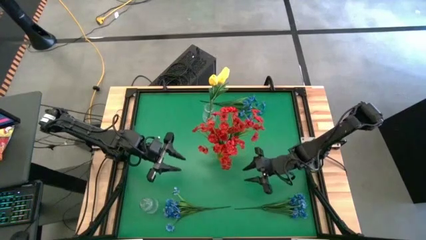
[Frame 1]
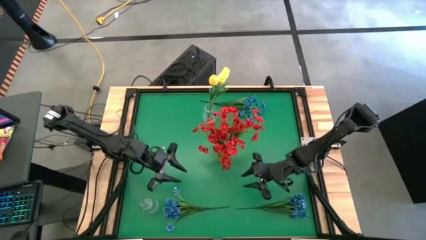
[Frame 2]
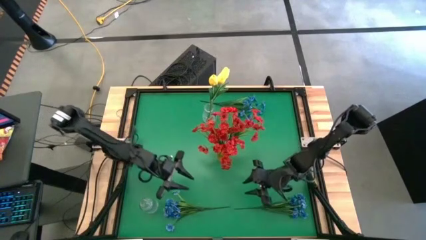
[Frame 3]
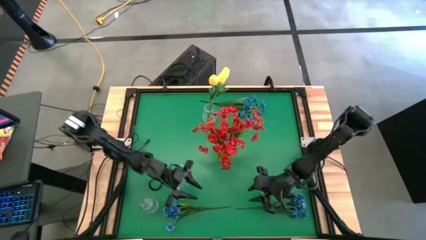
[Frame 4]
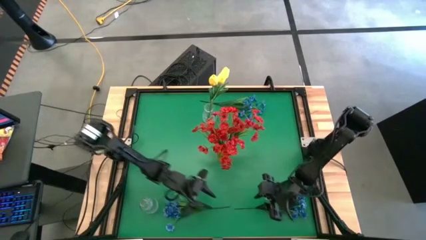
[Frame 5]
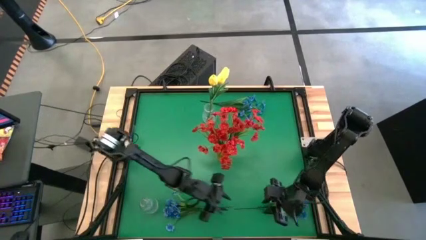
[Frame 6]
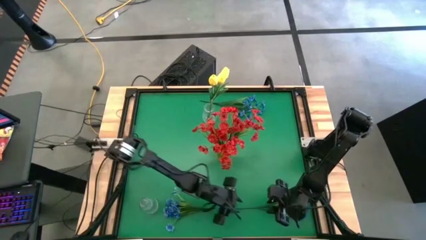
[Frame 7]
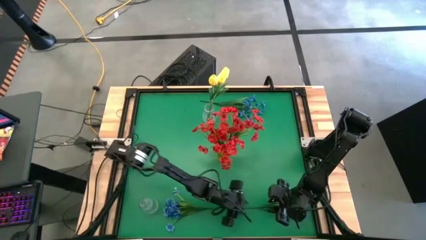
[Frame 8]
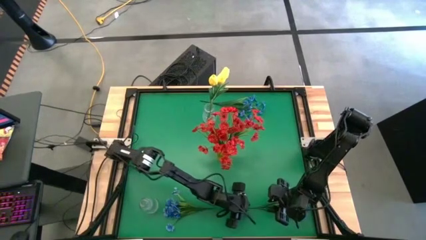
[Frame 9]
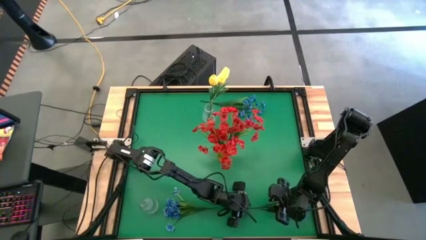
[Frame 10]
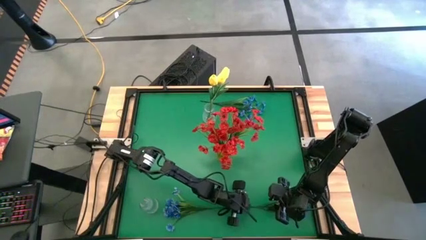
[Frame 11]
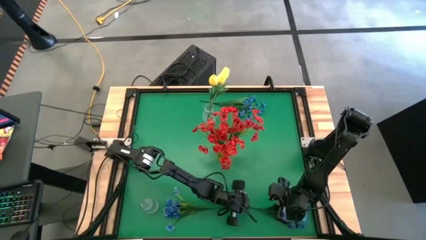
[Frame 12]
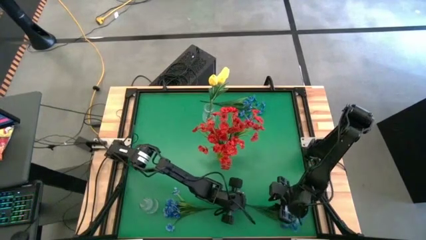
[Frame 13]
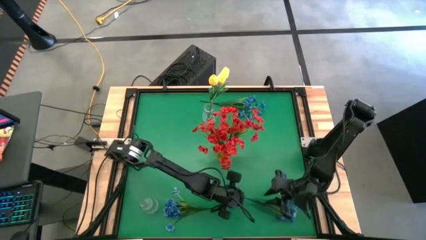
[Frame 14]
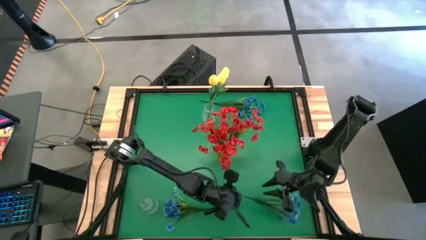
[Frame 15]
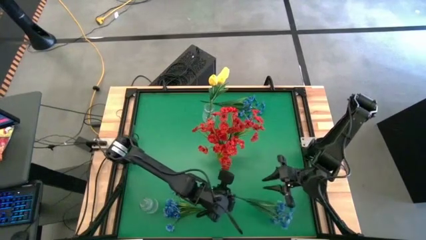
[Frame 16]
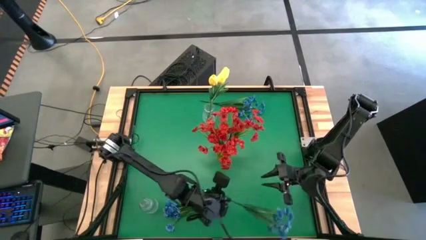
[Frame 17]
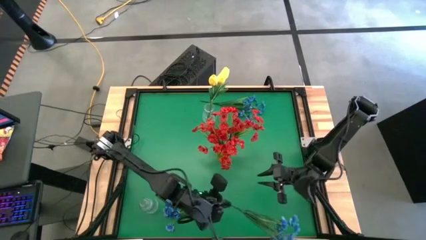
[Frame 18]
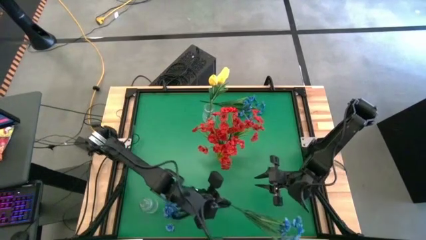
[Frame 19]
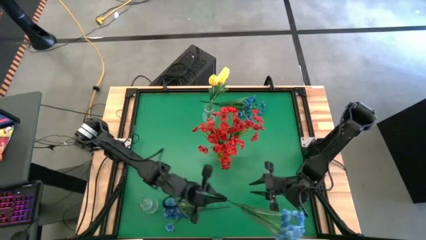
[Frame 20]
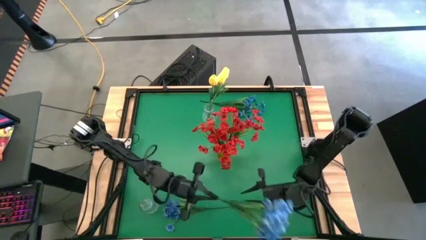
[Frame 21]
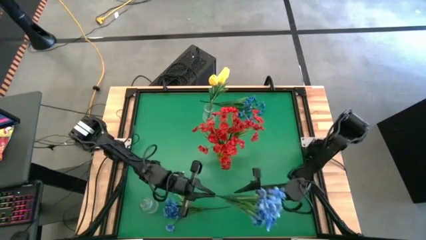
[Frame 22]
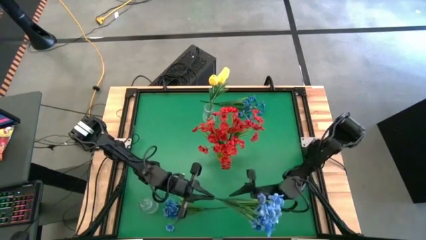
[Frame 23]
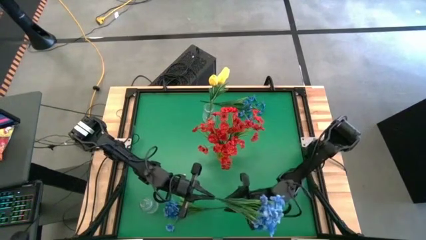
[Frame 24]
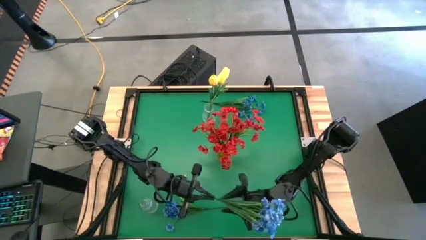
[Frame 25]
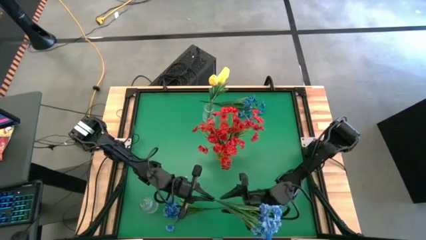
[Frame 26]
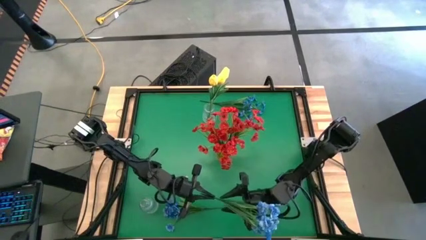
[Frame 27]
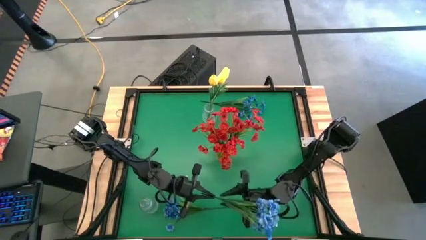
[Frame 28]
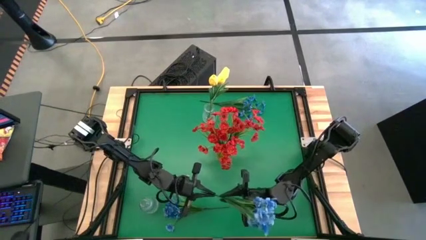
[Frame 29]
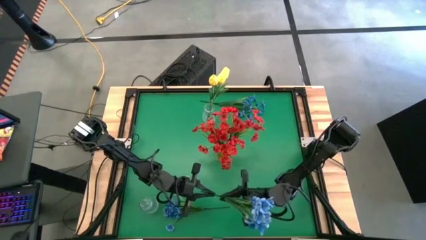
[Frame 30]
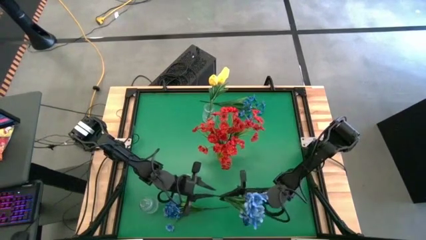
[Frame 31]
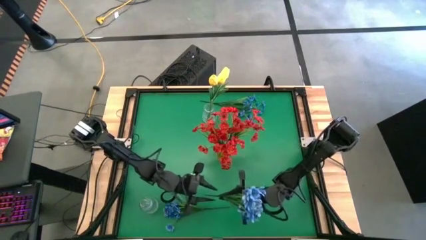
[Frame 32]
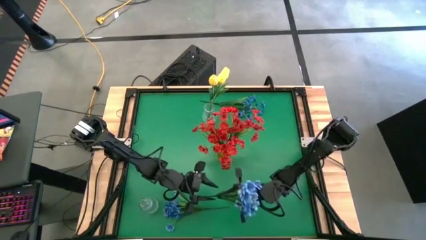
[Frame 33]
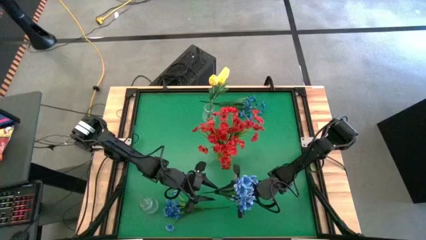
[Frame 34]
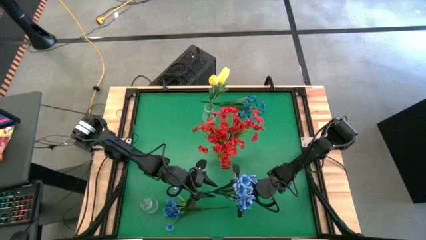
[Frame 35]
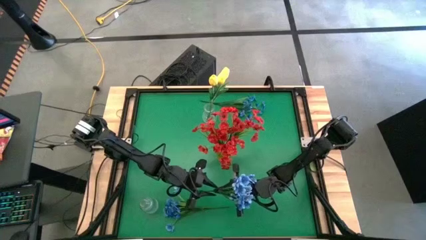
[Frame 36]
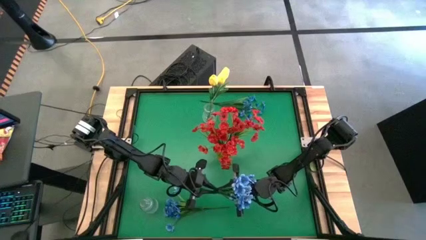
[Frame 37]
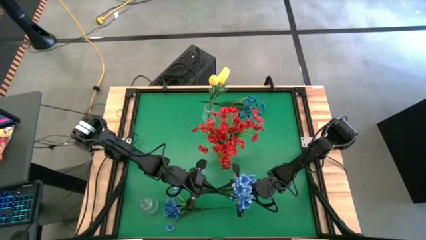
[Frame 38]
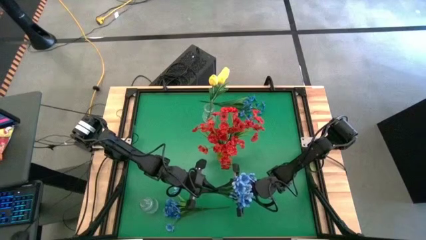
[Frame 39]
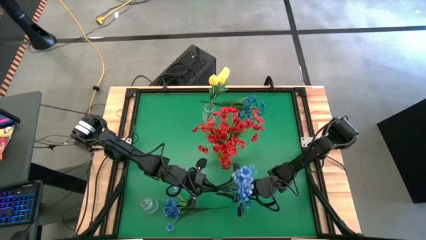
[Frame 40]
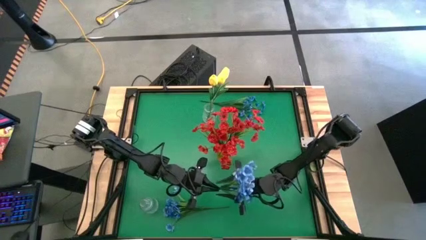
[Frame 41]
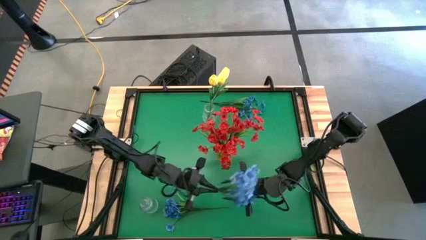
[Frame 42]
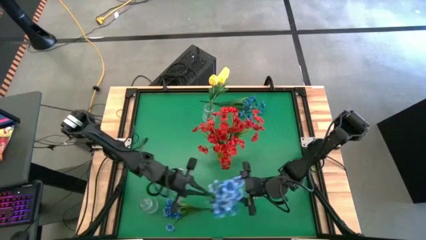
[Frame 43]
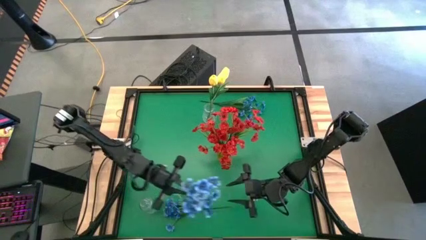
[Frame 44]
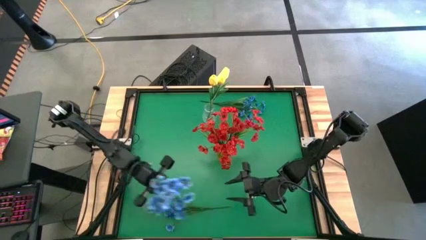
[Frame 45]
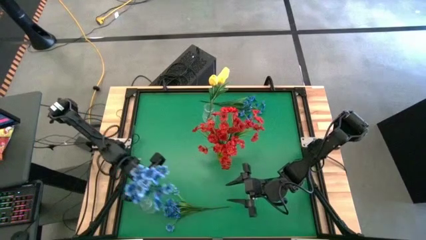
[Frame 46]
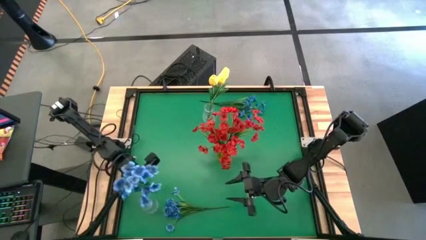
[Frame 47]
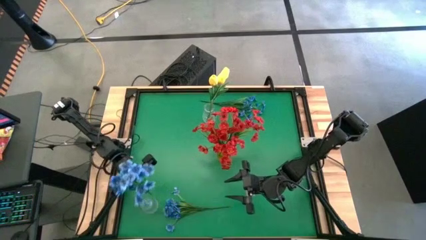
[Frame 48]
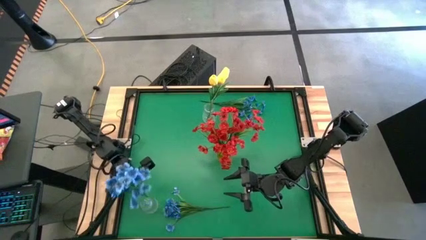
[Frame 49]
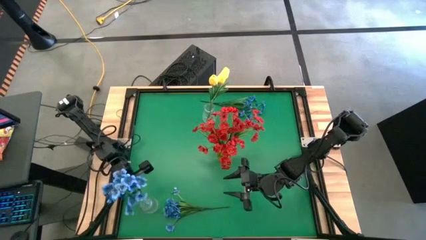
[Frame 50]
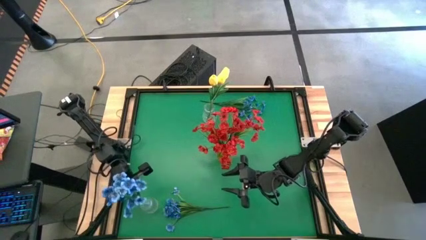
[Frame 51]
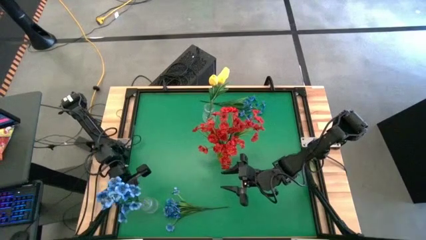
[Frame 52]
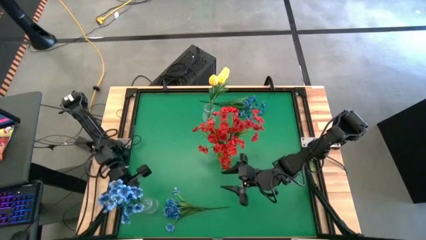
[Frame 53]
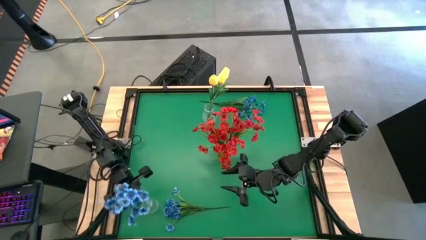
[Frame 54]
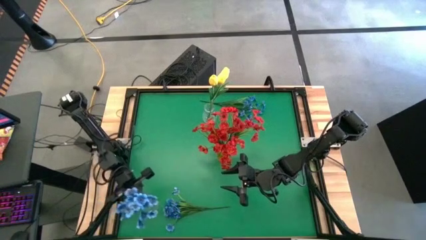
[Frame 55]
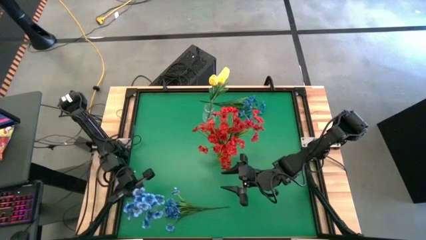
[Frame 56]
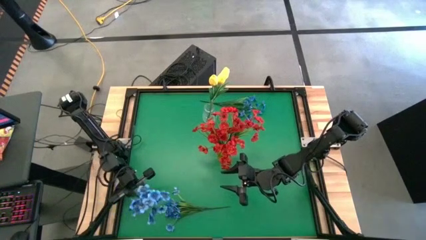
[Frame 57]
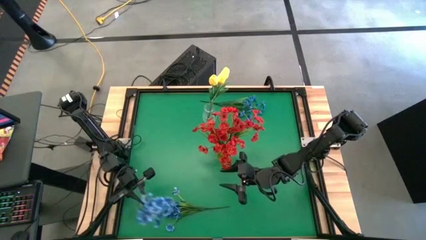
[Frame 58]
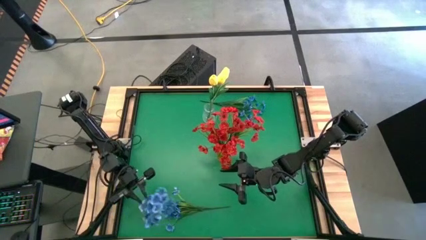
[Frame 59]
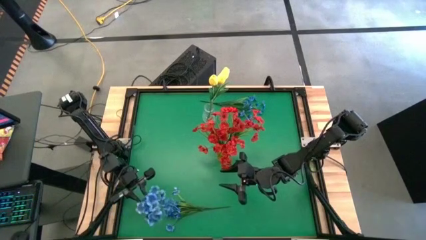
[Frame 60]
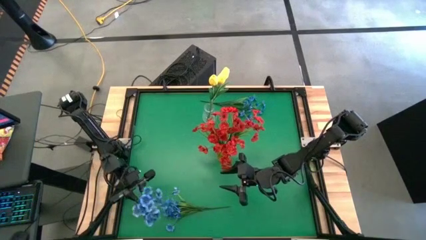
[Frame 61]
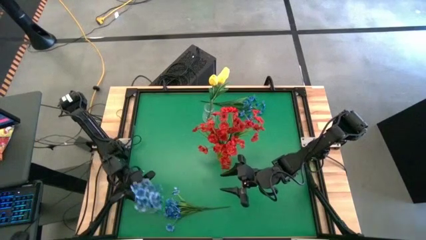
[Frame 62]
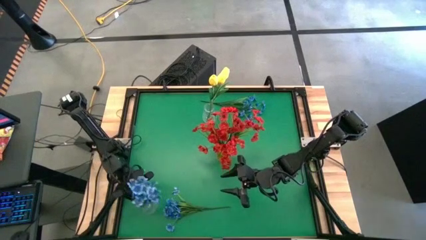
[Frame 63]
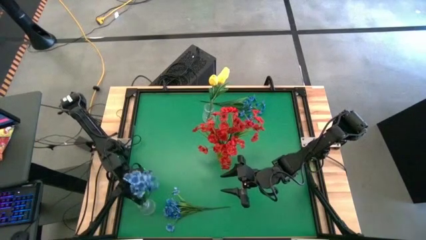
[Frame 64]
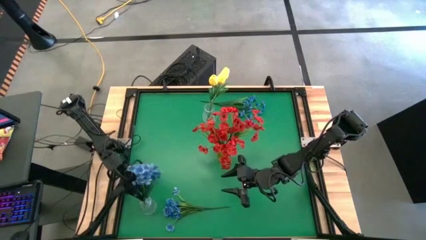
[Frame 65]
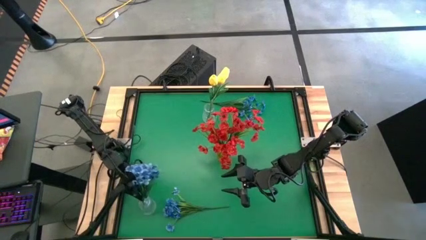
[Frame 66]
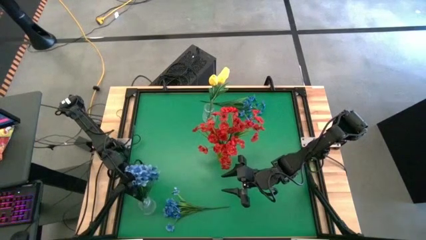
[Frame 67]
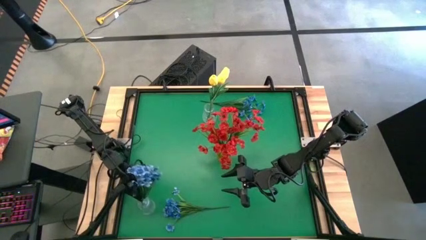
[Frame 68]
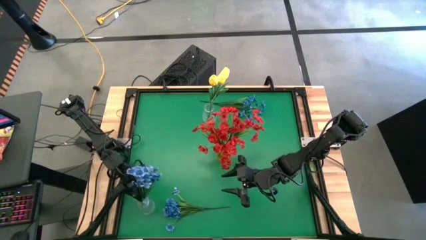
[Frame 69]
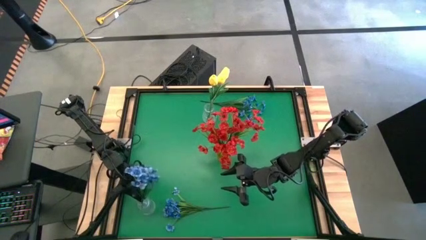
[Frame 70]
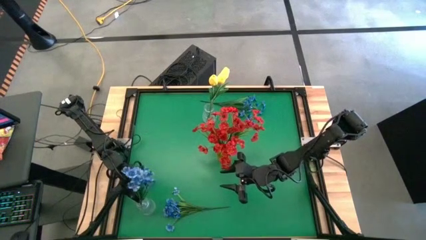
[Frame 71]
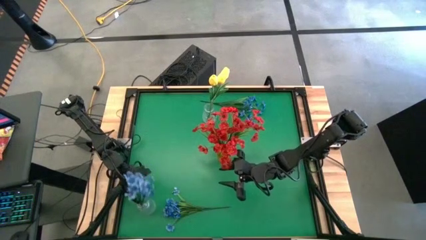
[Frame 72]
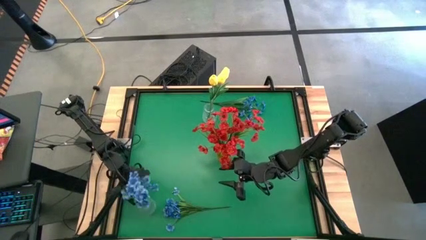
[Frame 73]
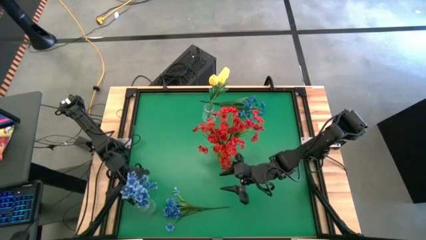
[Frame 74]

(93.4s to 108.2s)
Task: Sort flowers into vase by color
Put the bottom right blue flowers into the bottom transparent vase
